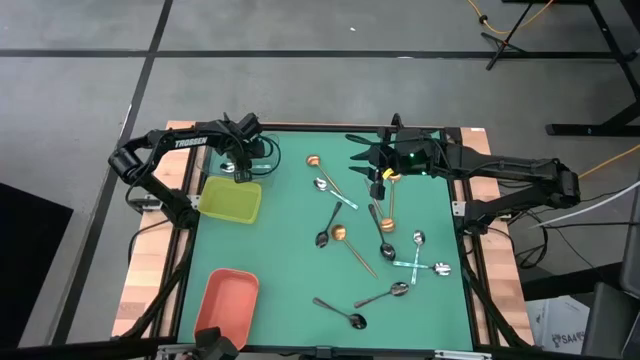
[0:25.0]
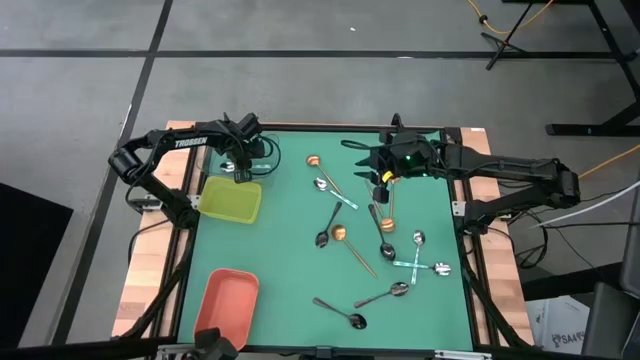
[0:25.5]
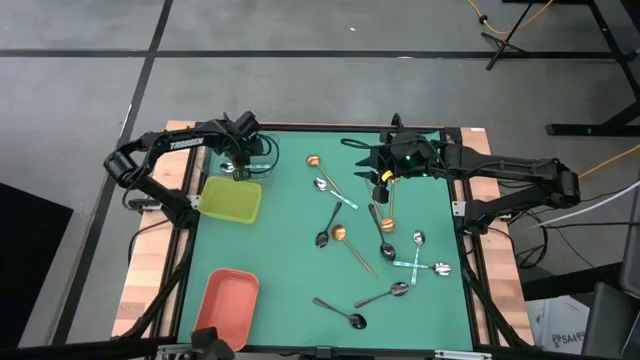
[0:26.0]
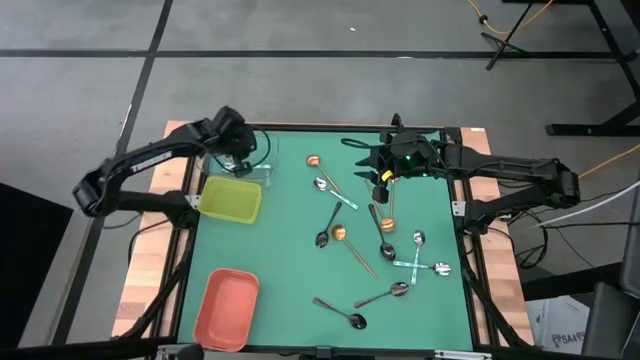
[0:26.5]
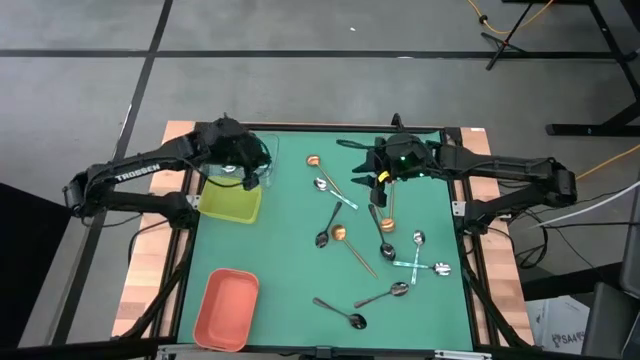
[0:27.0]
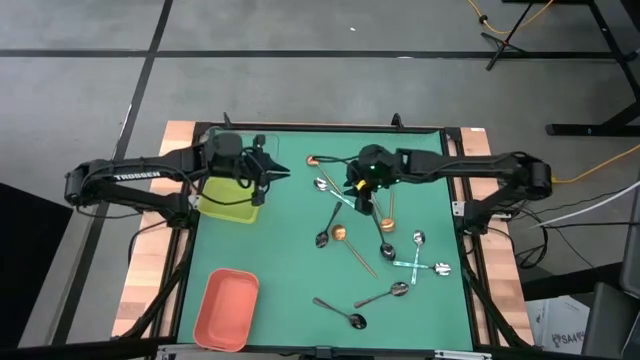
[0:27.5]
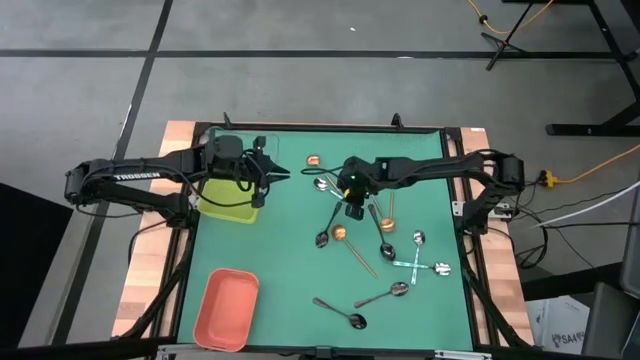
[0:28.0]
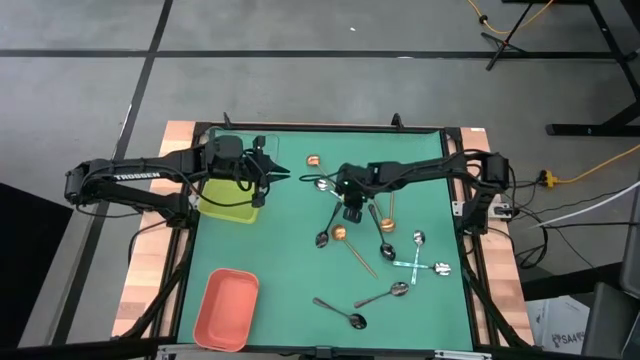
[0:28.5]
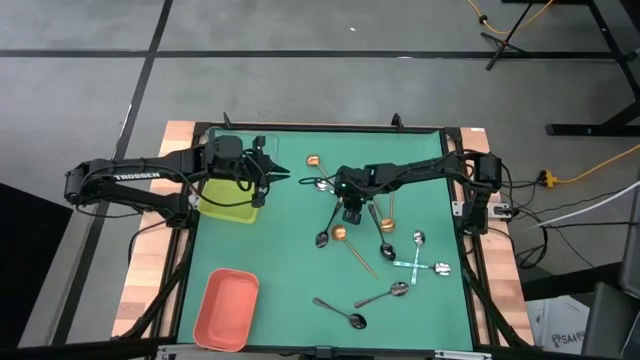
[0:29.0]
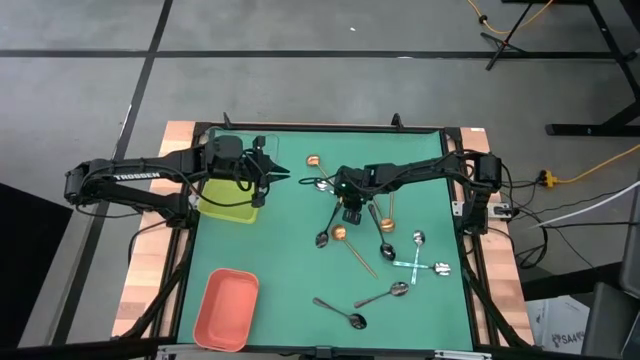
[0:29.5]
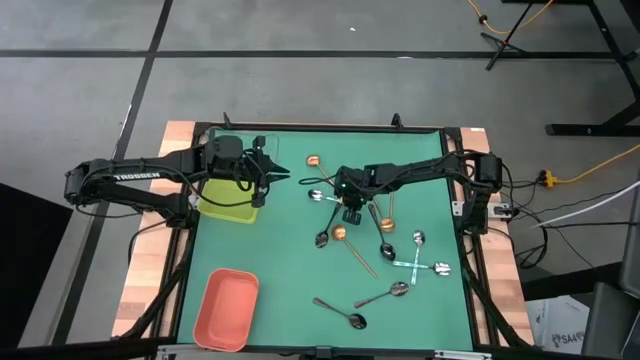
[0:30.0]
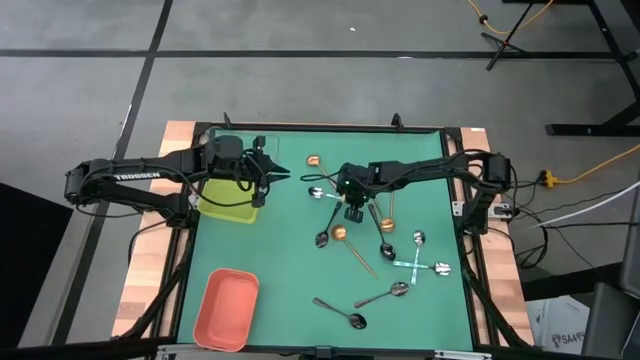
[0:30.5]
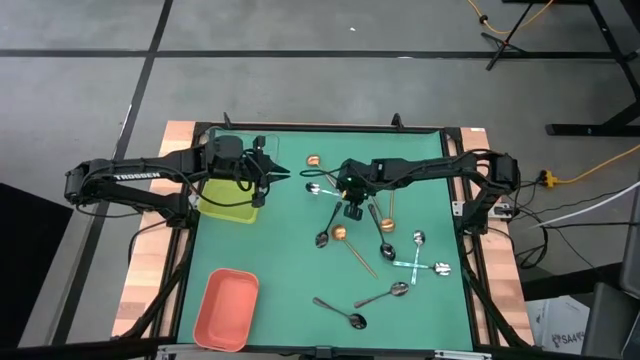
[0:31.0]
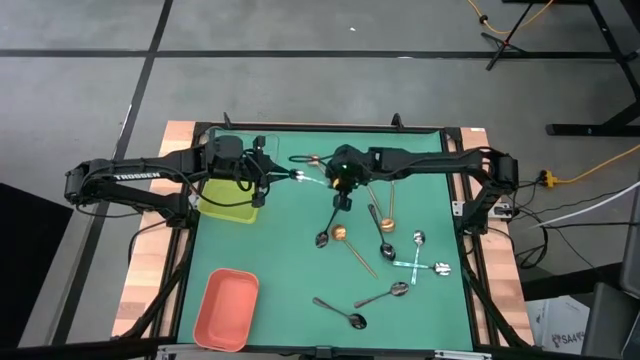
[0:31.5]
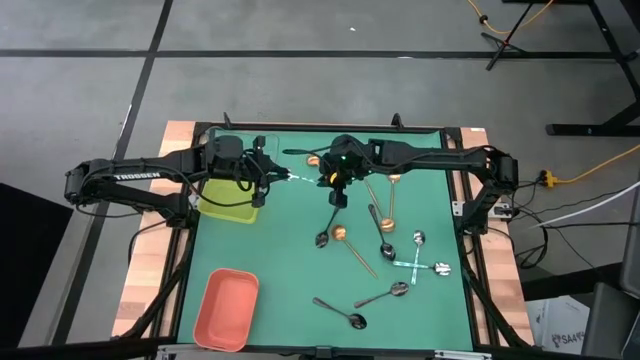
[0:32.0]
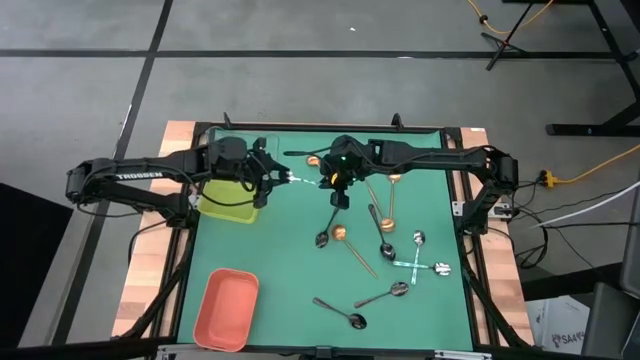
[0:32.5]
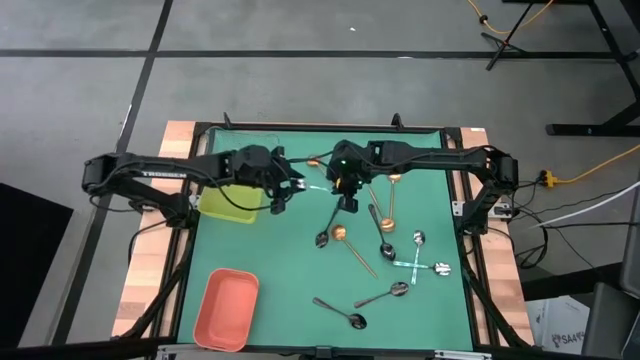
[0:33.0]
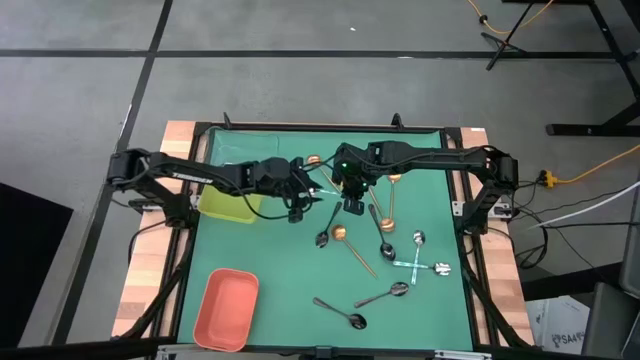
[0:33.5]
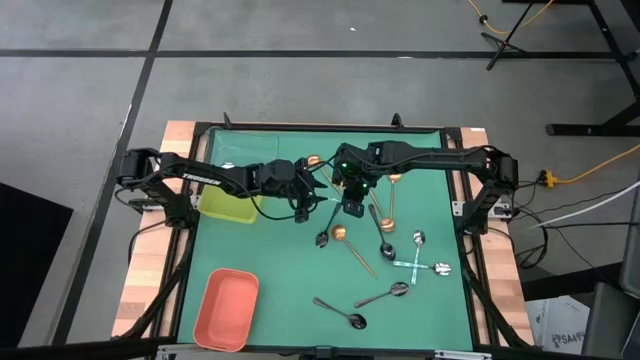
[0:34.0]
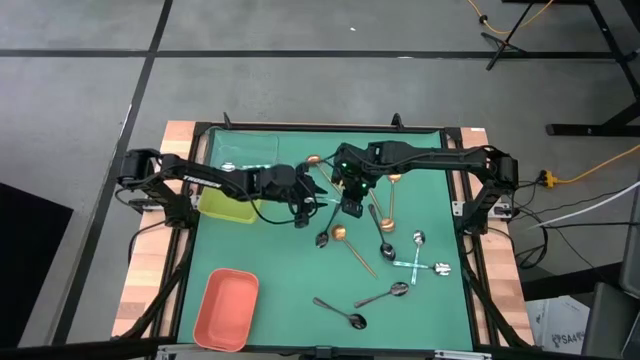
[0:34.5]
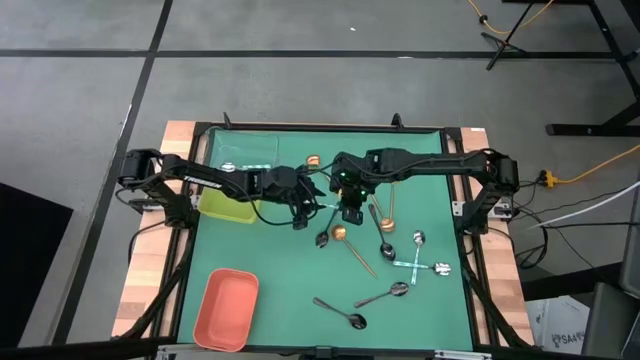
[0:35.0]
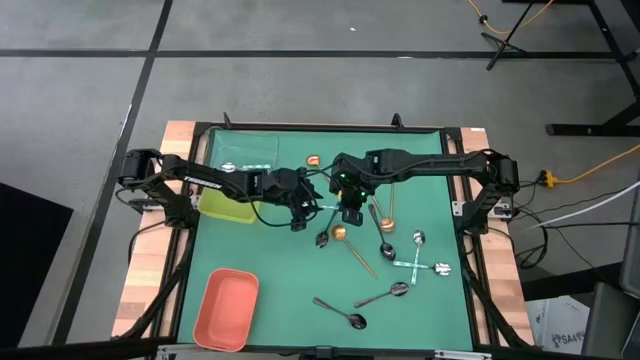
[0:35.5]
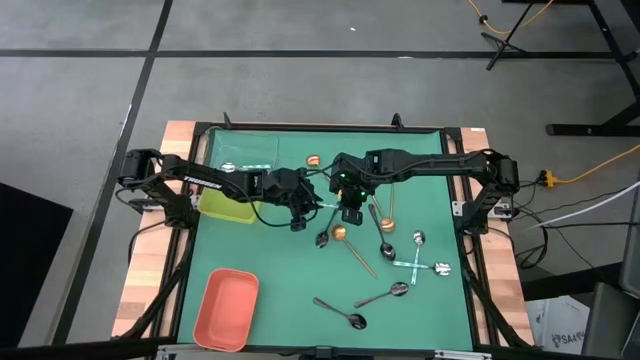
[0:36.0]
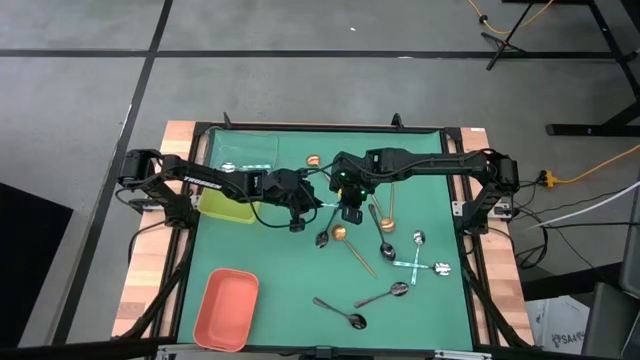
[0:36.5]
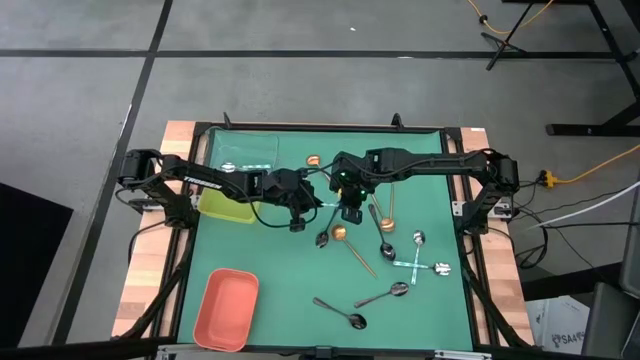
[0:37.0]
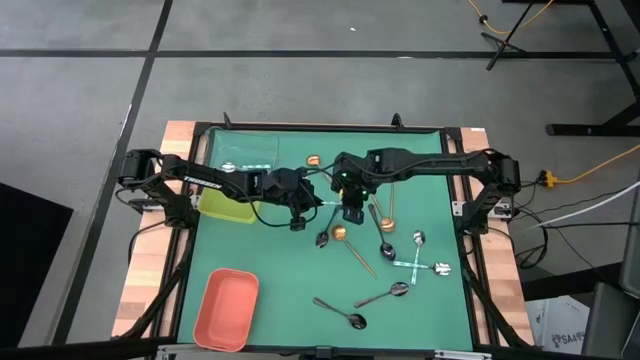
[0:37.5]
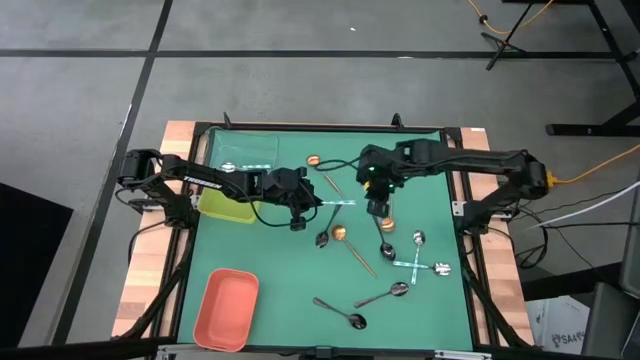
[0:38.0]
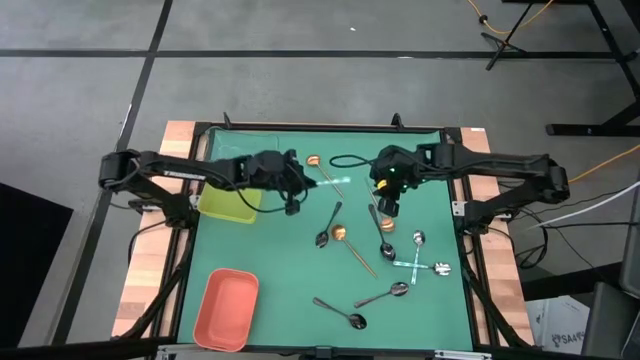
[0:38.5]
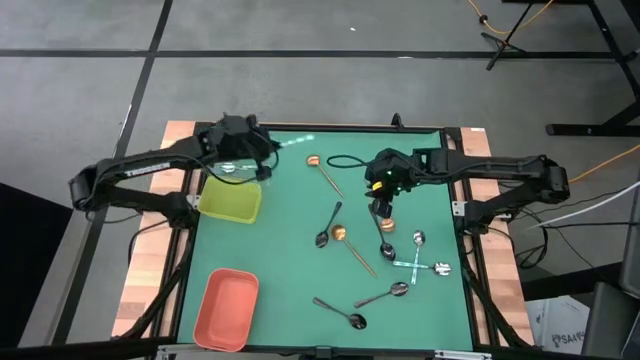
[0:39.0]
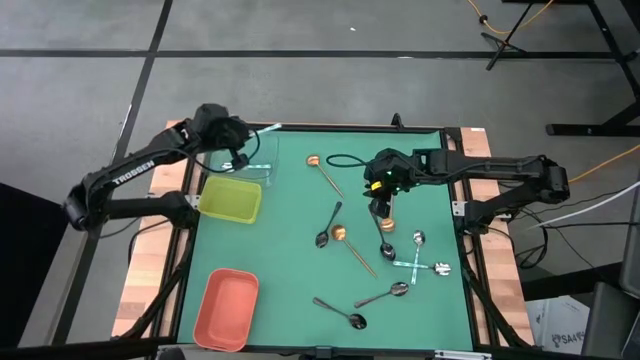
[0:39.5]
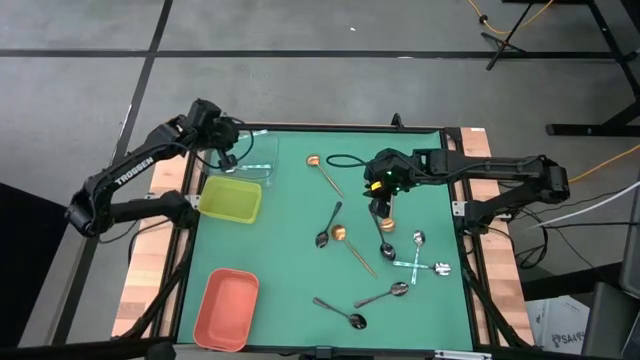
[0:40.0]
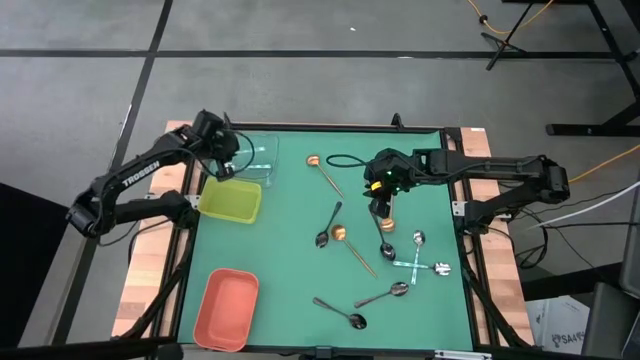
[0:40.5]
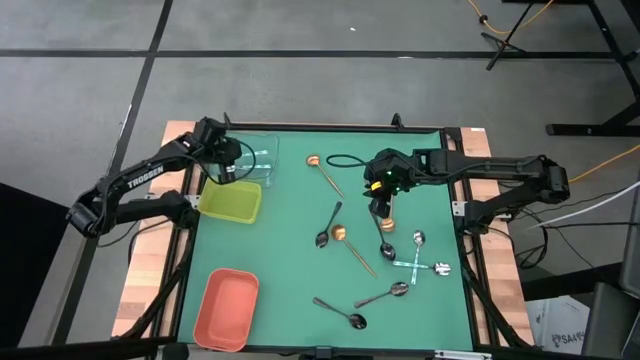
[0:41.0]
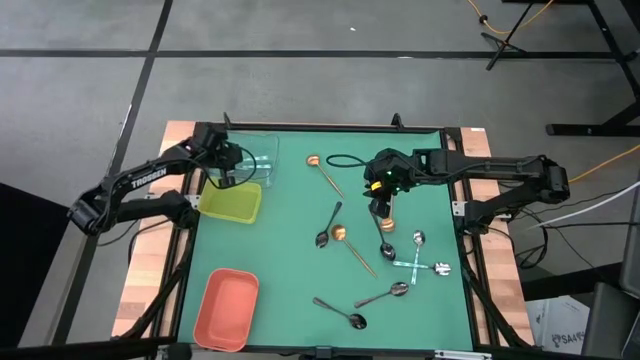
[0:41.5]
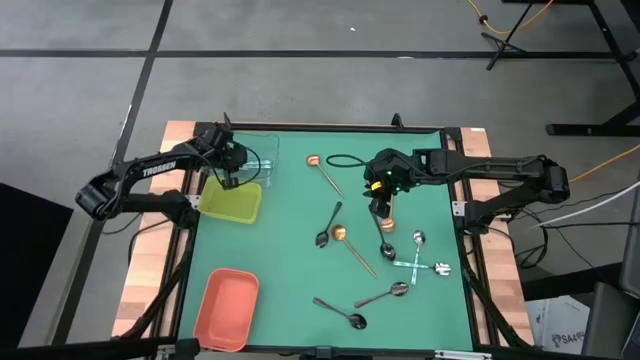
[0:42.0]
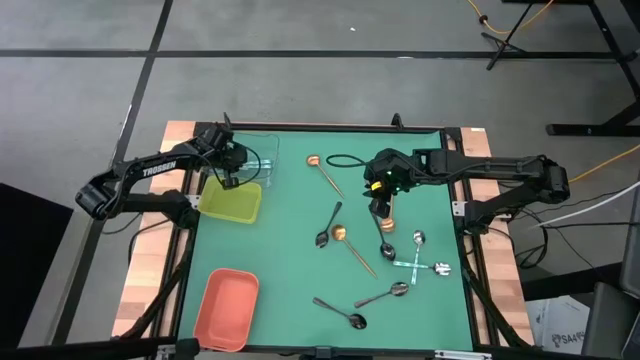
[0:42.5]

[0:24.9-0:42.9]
Task: Sort silverware by color (type)
Put the white spoon into the transparent bin
